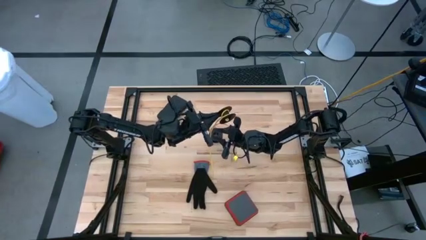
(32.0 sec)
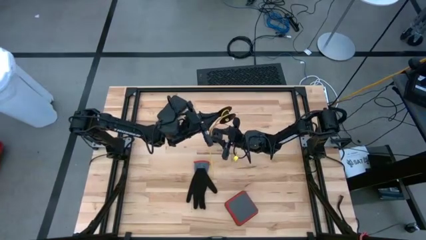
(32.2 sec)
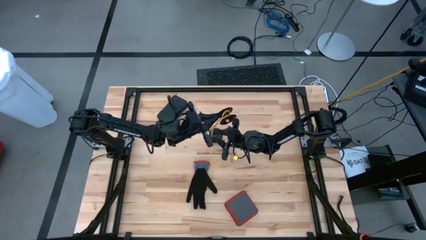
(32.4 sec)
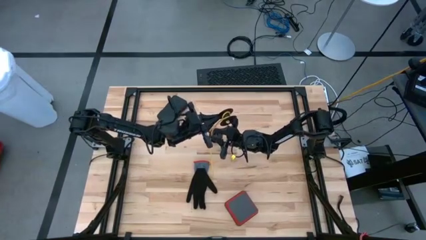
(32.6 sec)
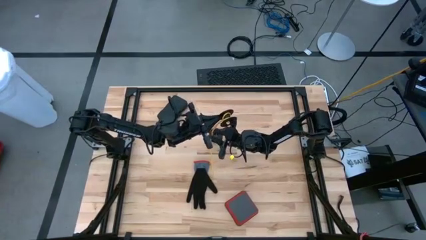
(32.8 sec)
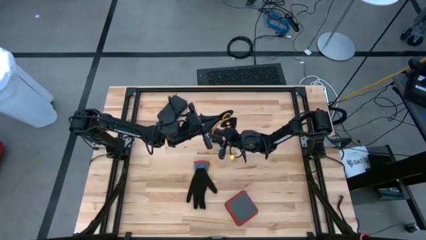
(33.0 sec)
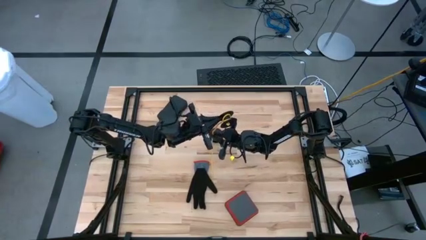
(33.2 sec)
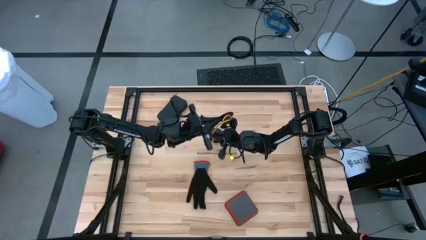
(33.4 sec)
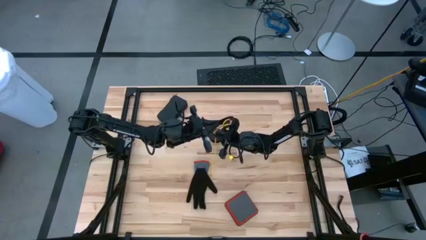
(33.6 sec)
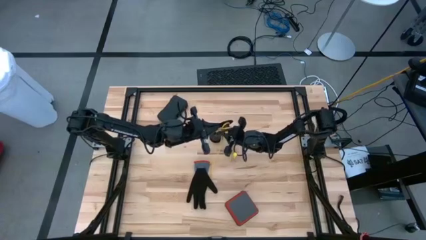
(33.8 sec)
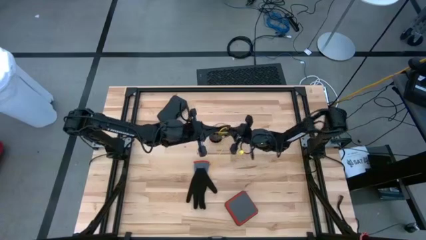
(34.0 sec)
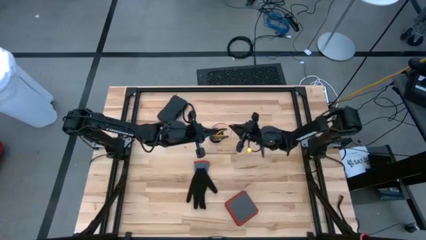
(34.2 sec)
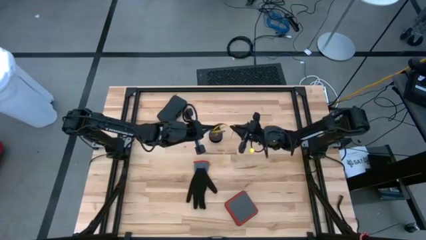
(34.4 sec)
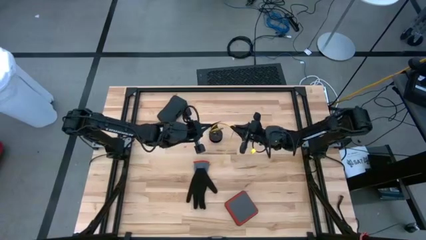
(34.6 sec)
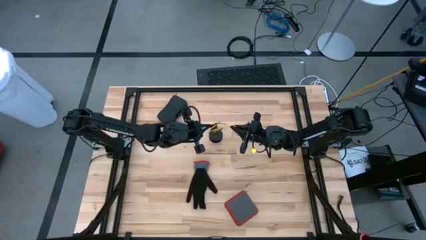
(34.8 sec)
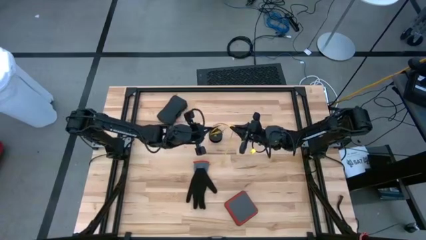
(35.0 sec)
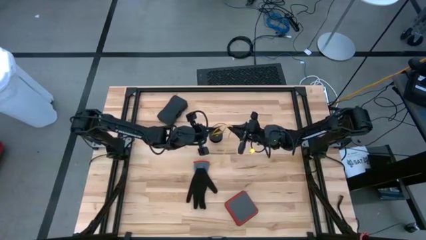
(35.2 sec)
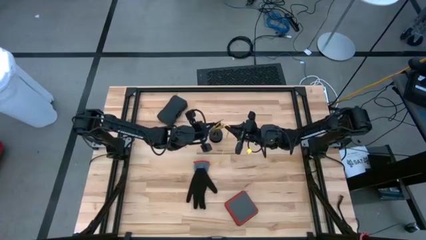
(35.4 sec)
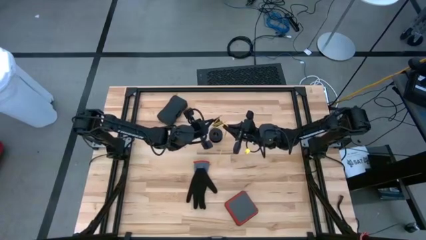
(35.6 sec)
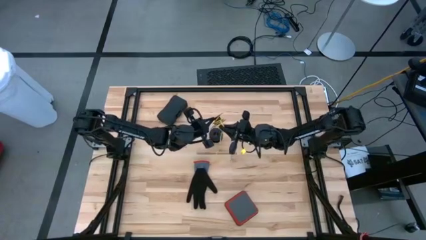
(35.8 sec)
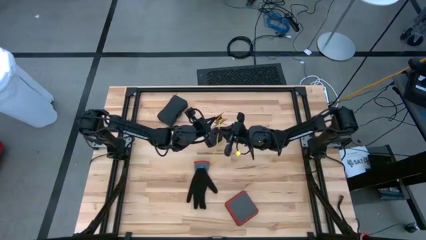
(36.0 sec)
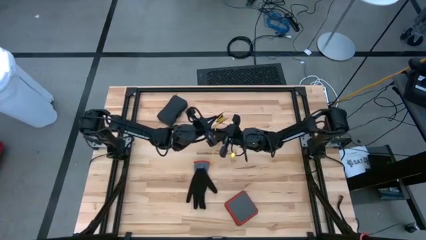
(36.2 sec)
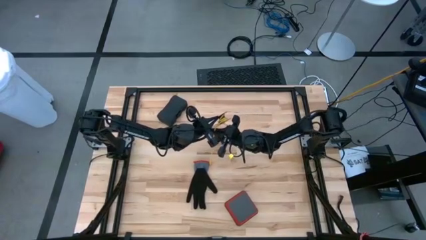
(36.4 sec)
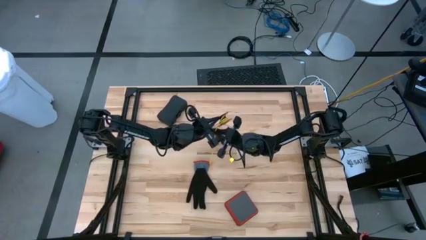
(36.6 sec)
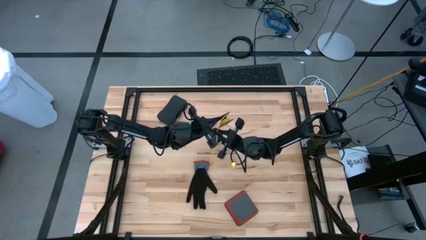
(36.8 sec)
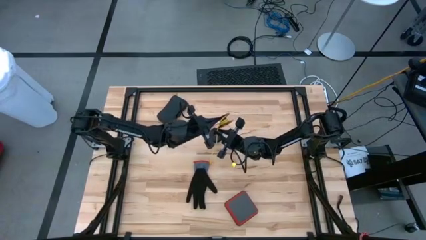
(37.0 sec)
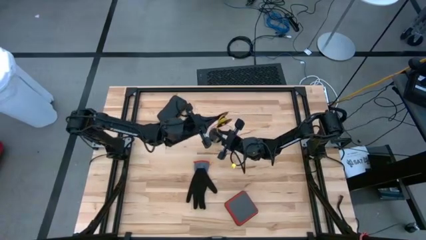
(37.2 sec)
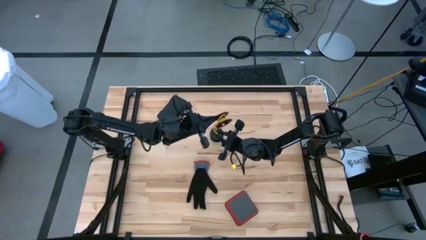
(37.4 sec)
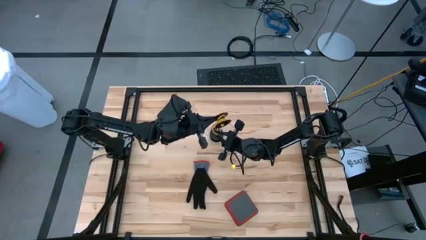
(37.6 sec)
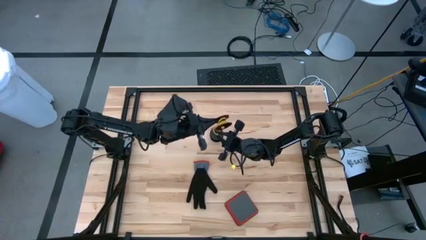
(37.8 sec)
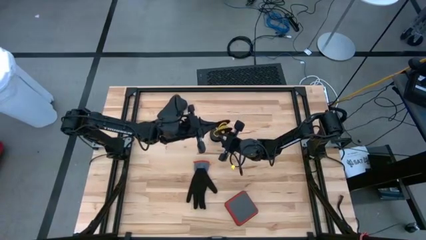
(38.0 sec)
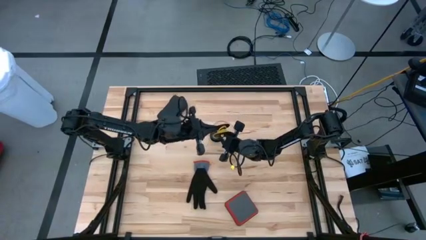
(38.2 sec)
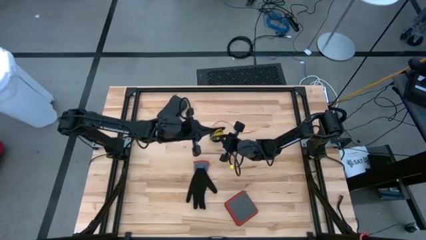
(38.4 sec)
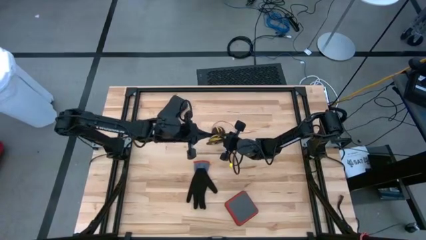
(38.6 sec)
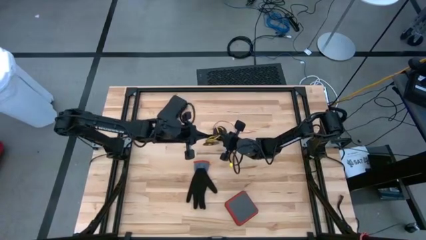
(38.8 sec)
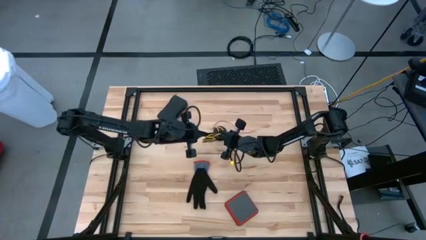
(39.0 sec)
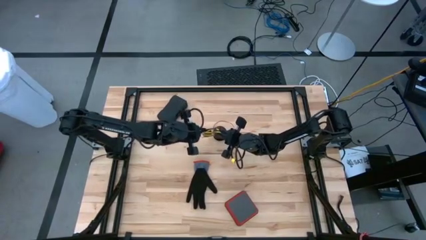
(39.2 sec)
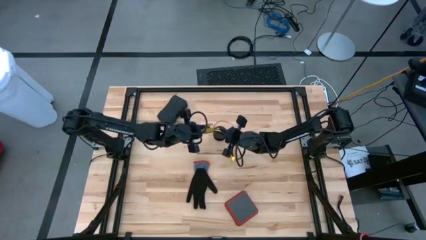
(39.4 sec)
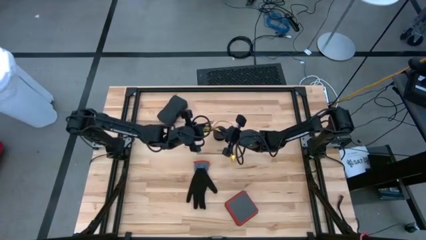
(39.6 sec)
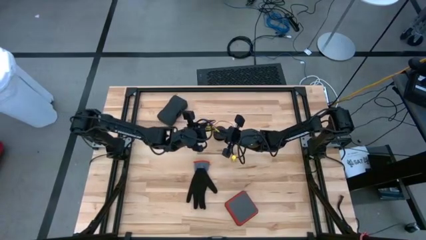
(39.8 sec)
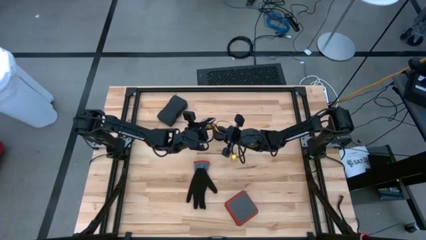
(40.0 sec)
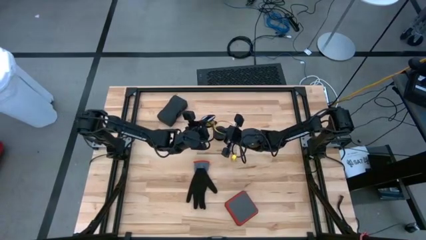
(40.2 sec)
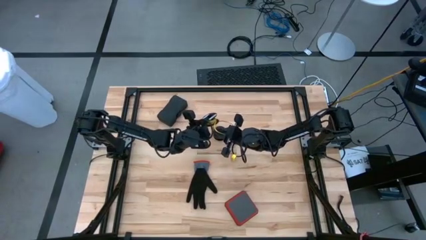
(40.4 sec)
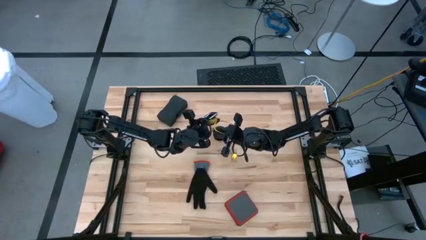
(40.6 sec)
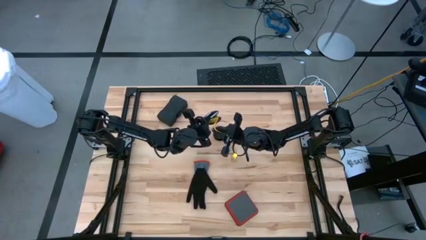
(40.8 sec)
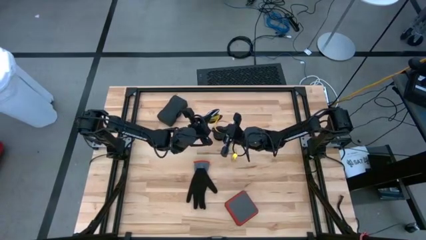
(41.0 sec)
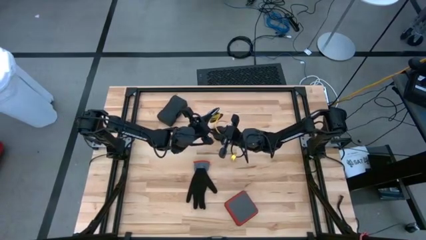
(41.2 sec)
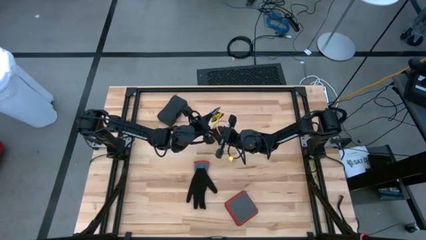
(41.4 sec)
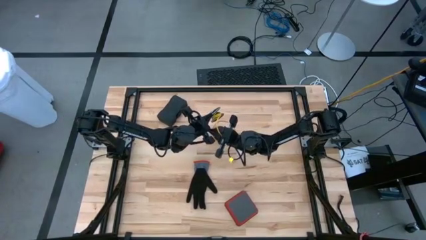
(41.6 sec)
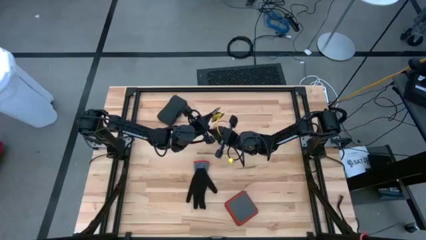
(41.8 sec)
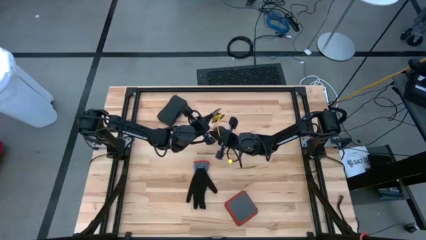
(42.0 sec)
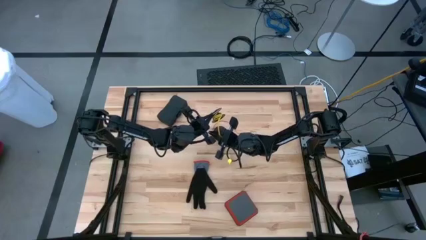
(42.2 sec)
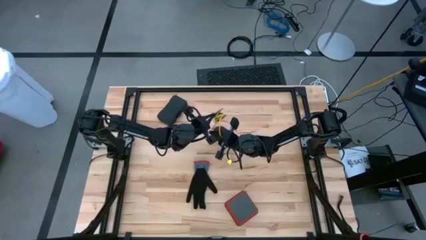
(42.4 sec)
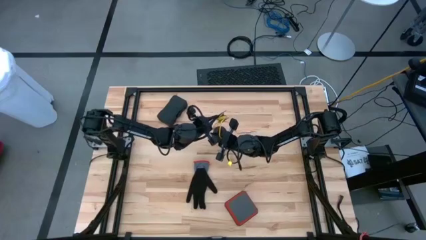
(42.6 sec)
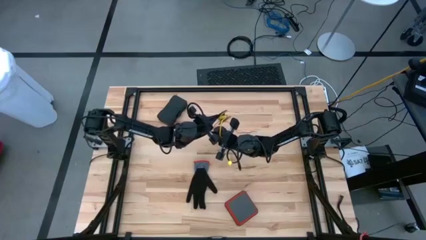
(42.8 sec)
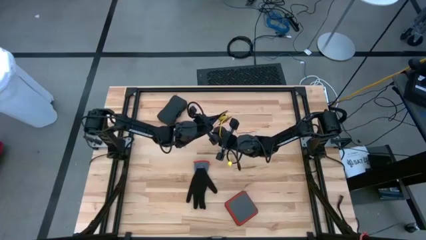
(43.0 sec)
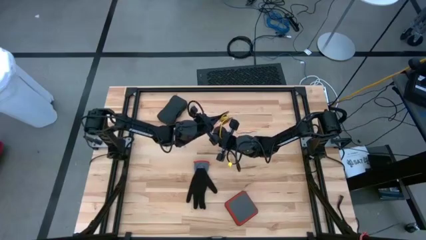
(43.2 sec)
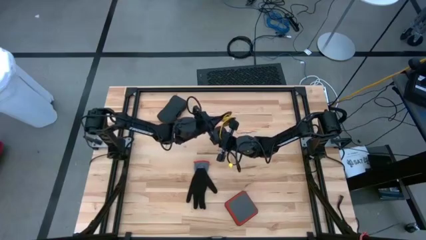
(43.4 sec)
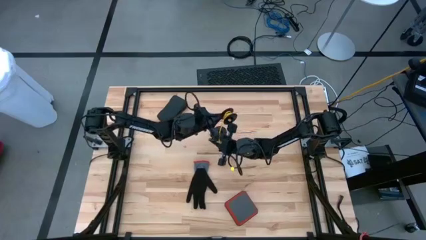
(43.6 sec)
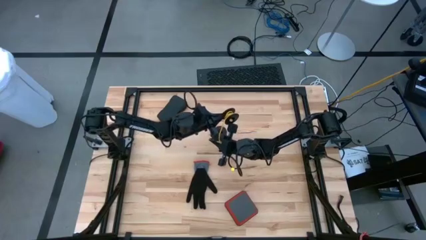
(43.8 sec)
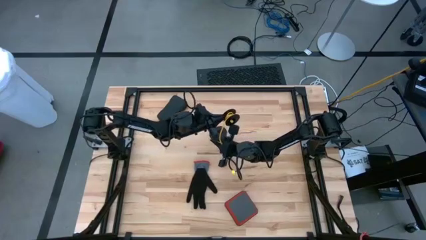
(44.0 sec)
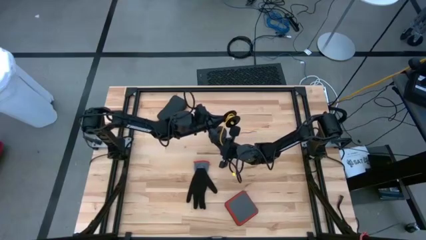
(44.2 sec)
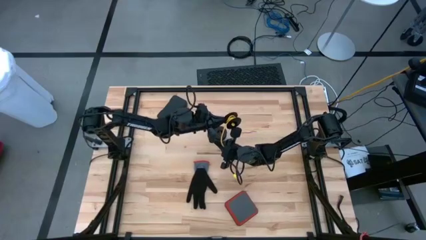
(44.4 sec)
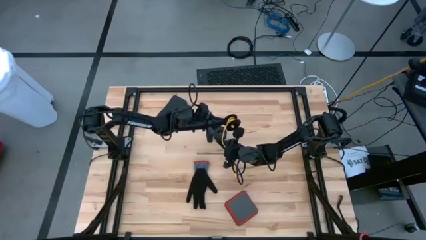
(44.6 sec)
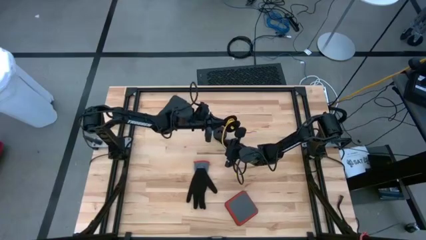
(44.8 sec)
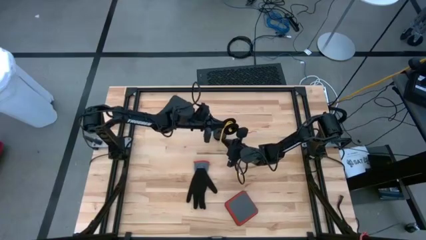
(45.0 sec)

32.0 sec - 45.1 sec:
Task: Coil cords
Coil the yellow wire onto the black spool

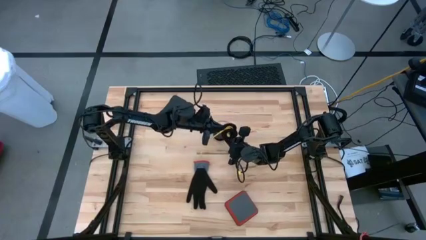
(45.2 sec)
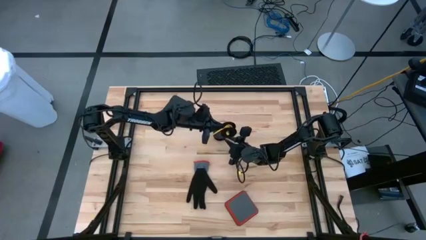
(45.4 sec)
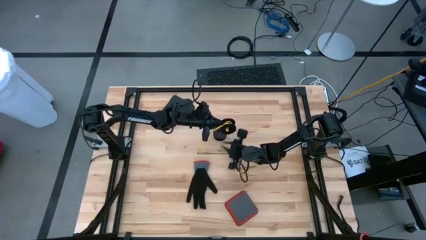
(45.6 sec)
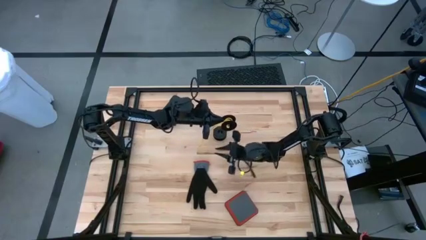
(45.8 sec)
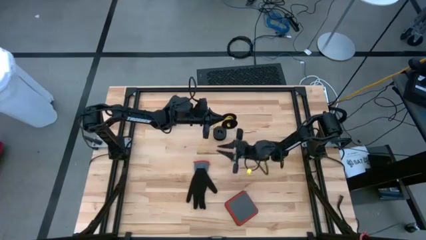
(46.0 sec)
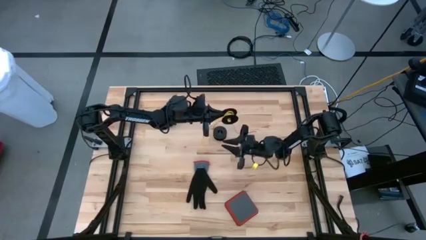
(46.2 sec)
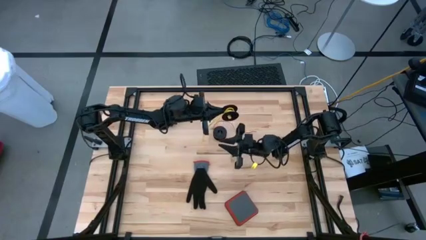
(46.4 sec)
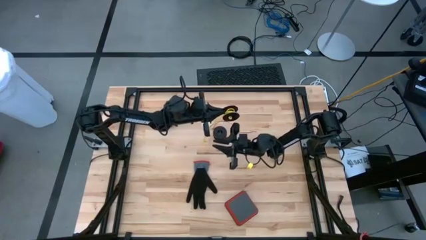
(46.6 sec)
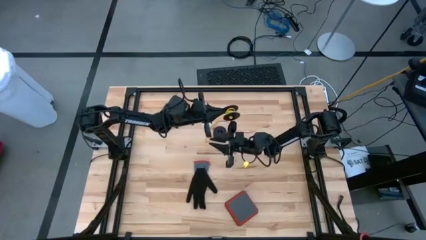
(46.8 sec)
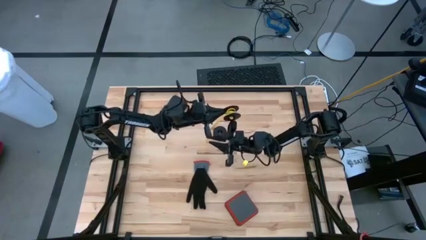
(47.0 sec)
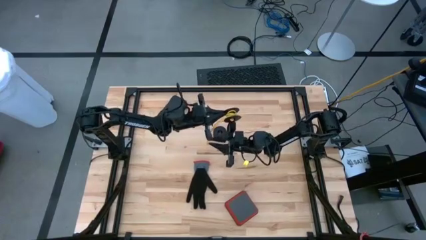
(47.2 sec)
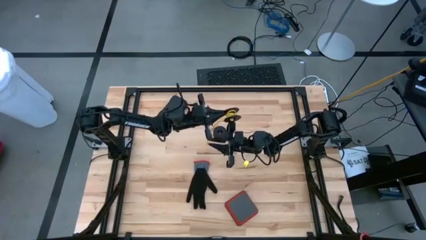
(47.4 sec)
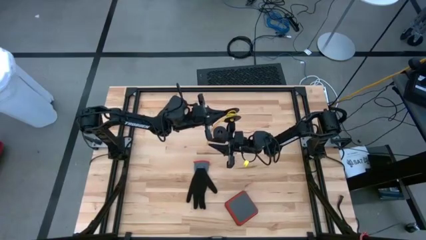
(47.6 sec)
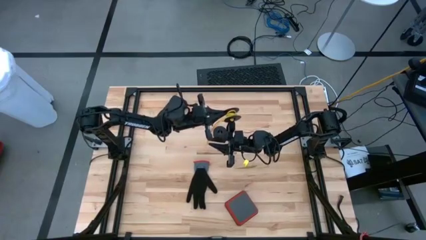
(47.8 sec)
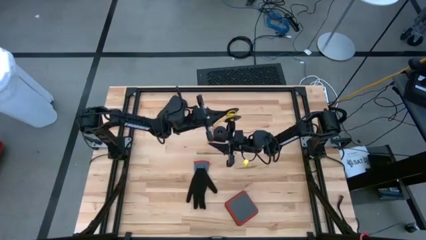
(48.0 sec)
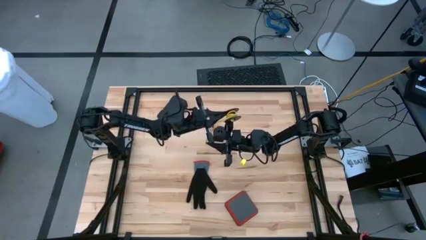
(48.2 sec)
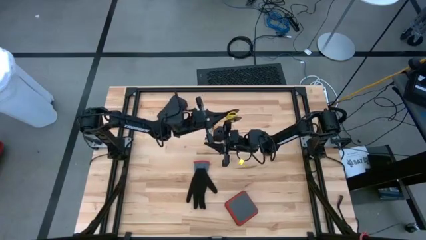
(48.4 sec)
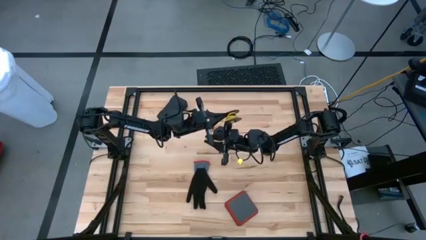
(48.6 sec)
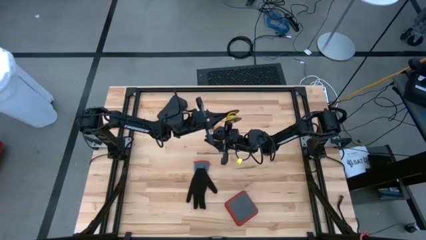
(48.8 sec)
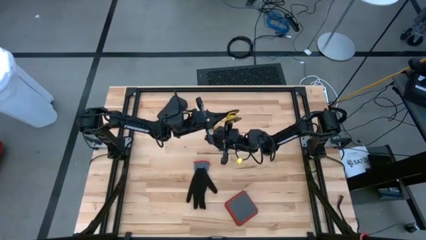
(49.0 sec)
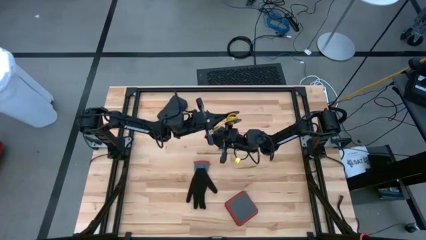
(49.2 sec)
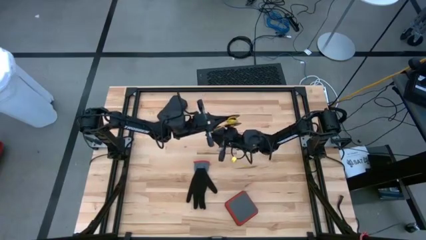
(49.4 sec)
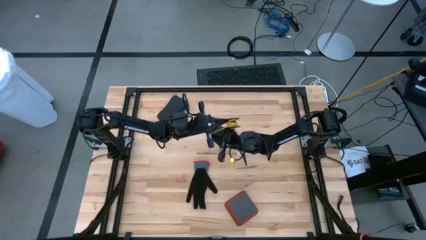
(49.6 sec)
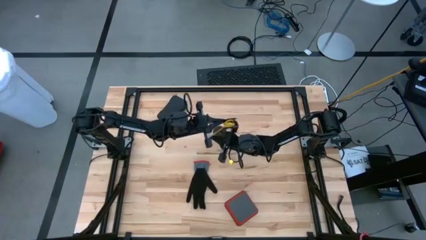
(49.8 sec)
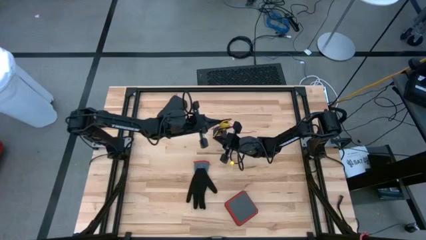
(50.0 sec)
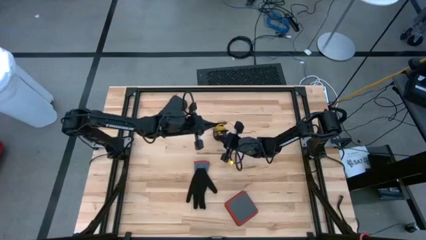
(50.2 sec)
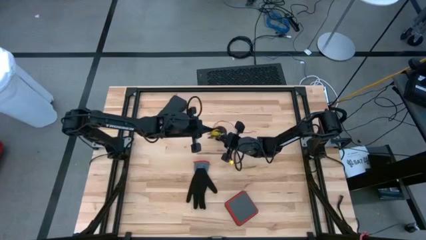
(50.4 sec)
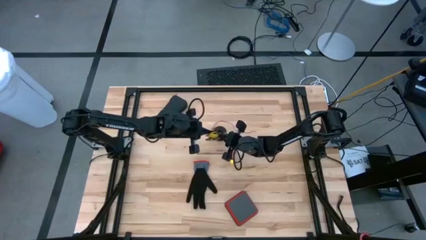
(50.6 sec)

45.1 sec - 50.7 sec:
Coil the yellow wire onto the black spool
